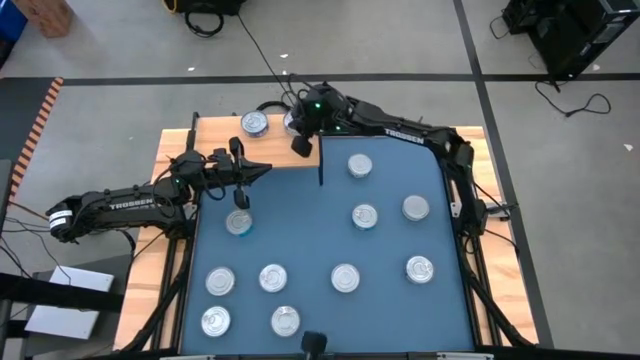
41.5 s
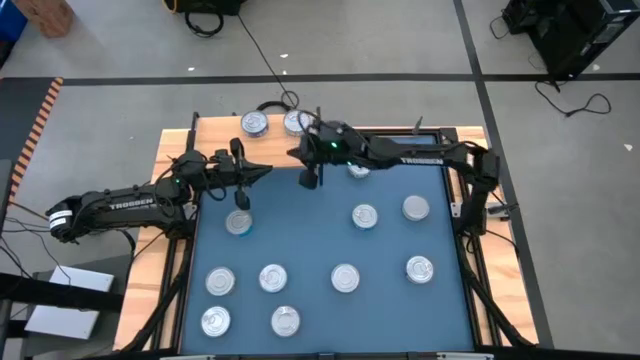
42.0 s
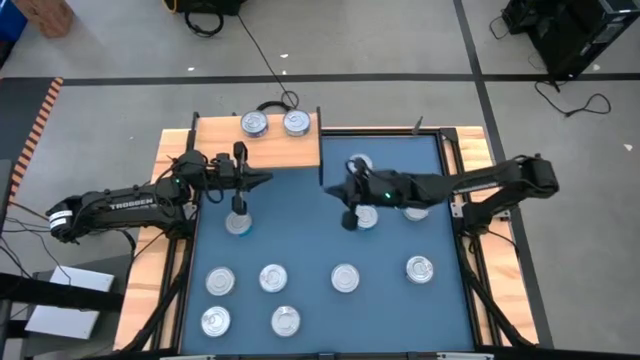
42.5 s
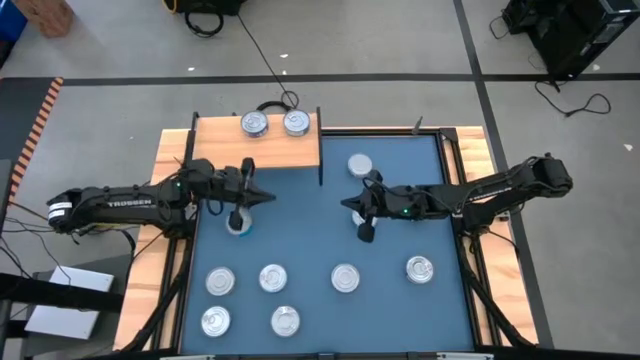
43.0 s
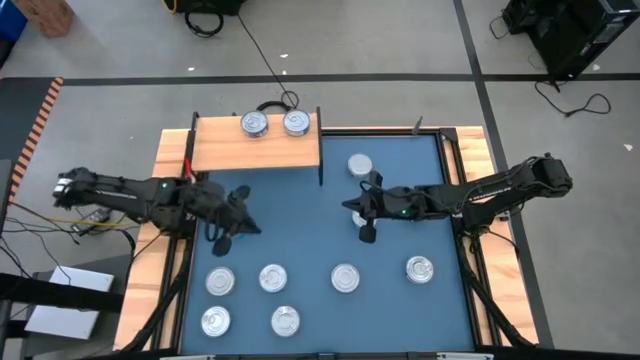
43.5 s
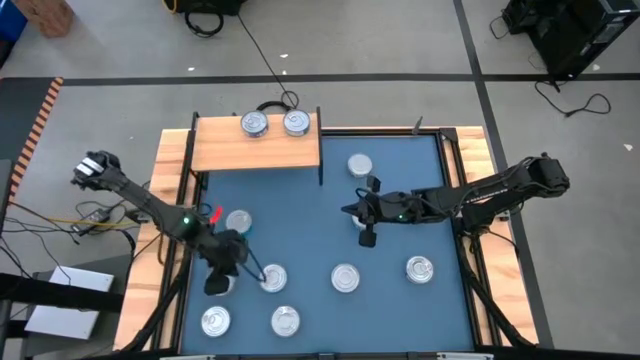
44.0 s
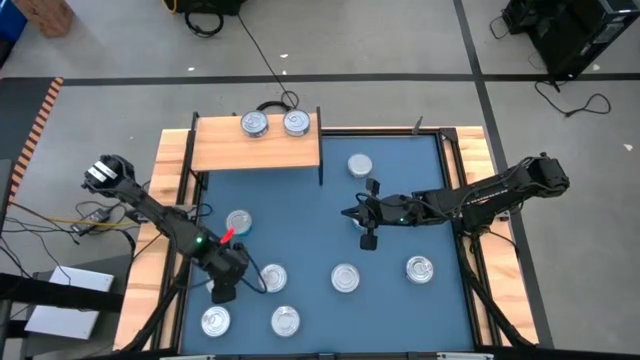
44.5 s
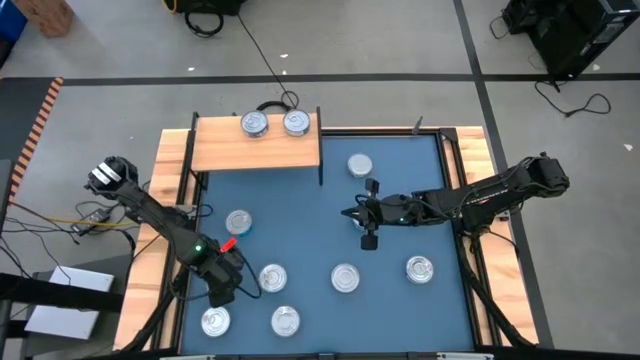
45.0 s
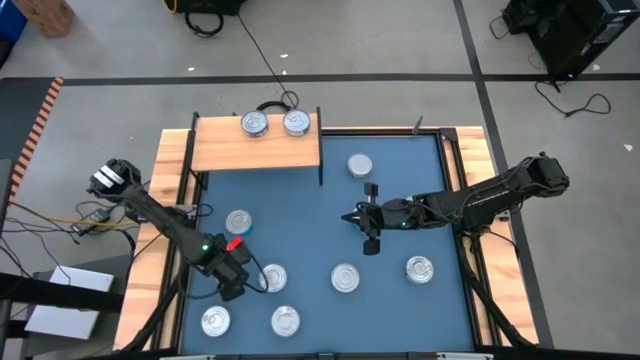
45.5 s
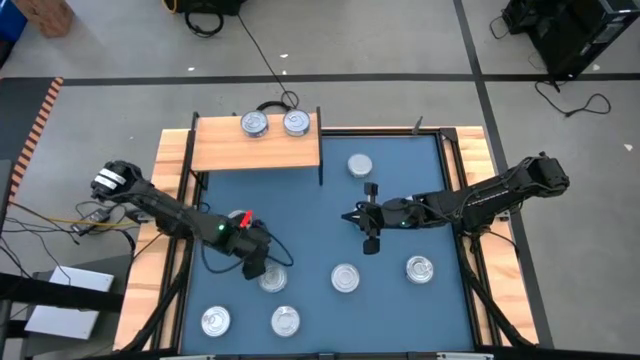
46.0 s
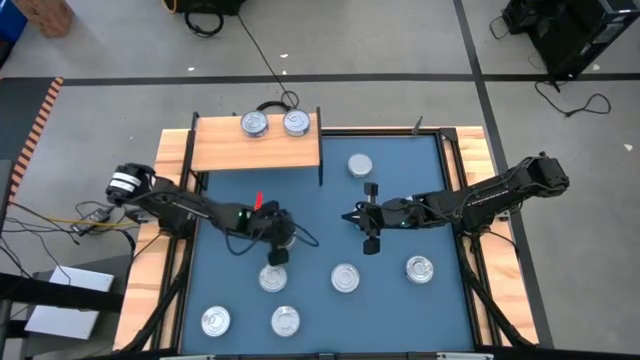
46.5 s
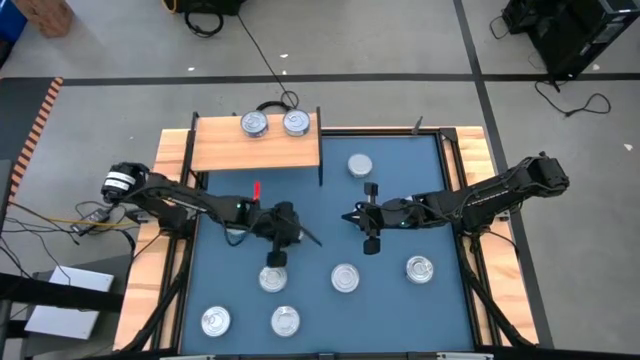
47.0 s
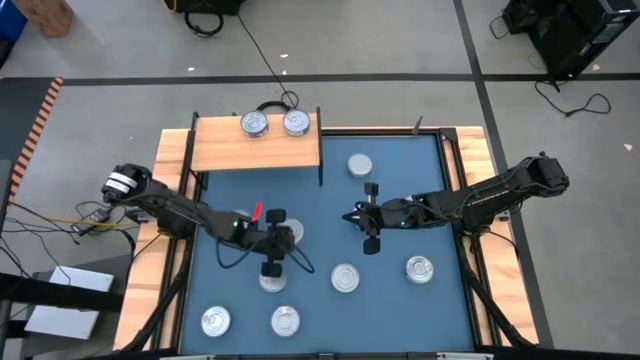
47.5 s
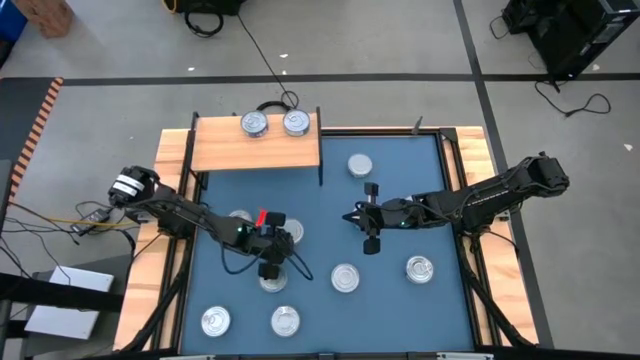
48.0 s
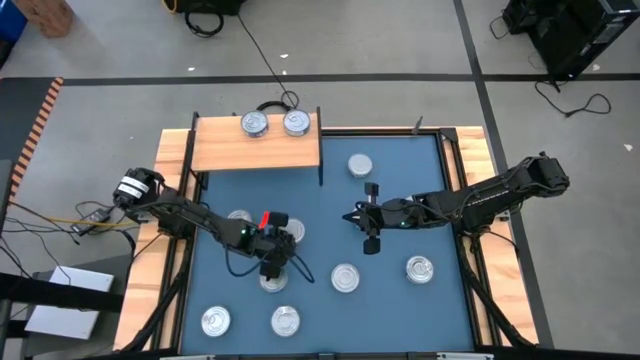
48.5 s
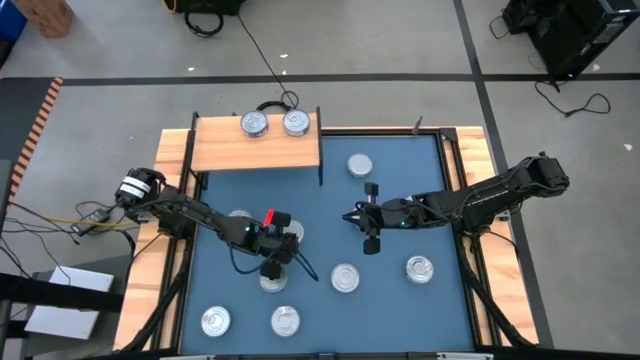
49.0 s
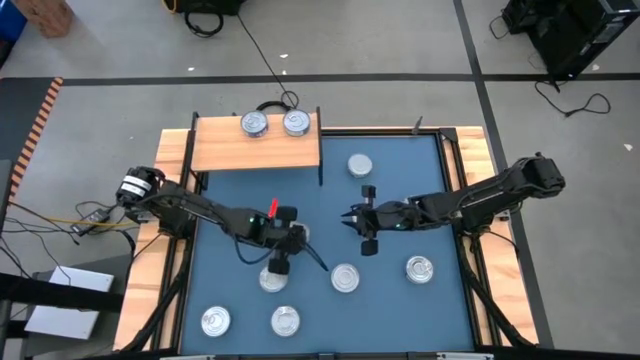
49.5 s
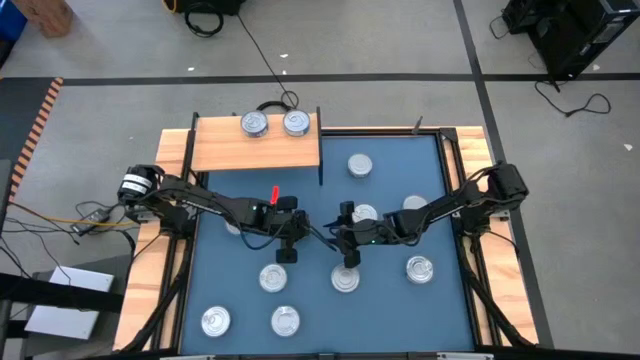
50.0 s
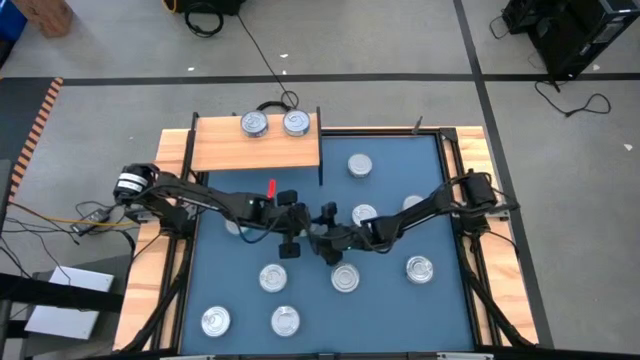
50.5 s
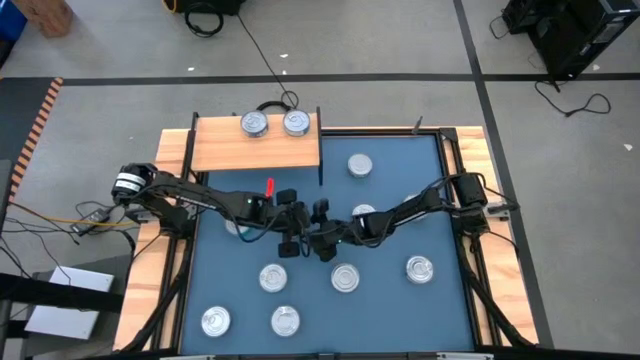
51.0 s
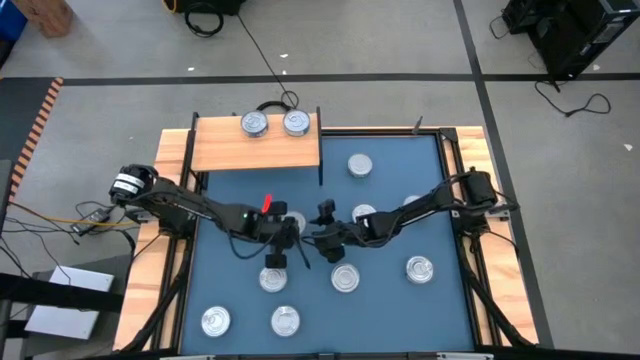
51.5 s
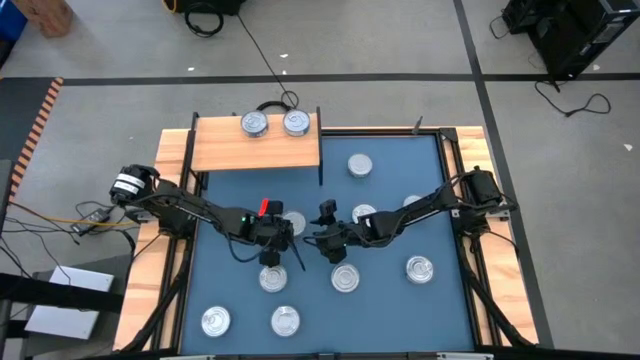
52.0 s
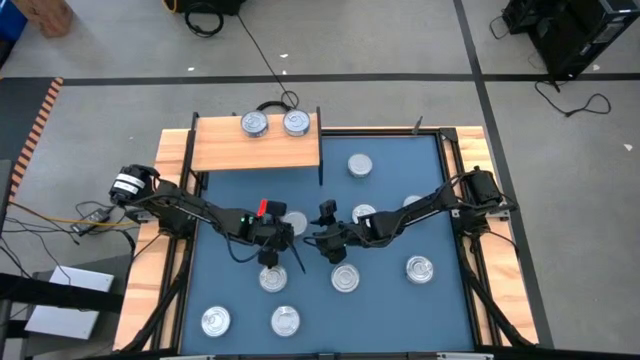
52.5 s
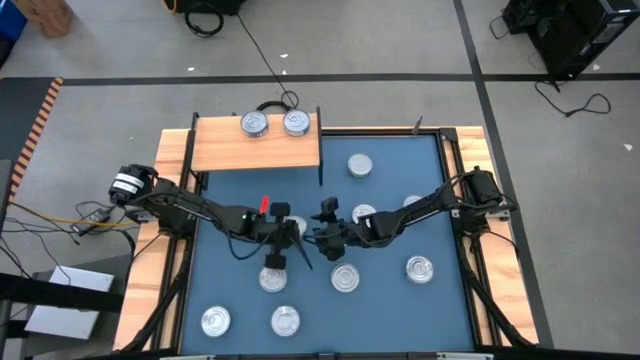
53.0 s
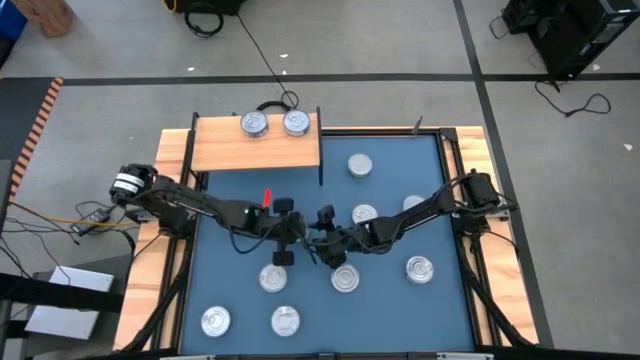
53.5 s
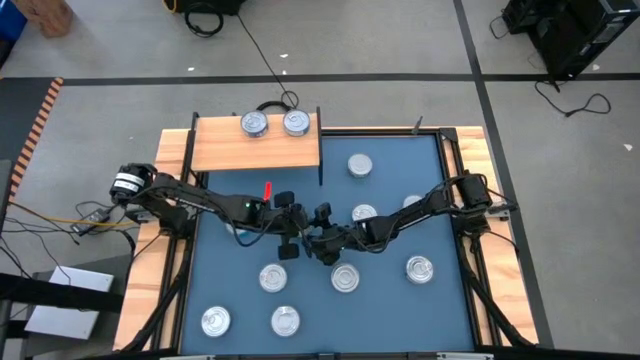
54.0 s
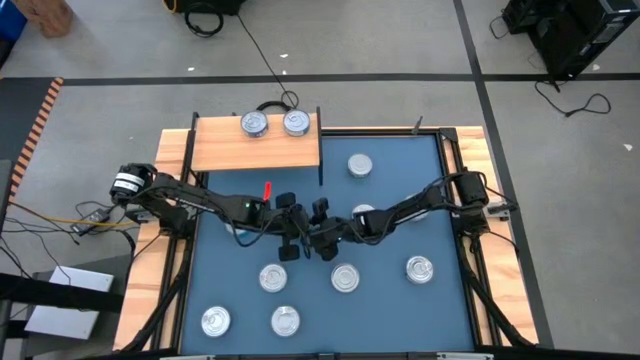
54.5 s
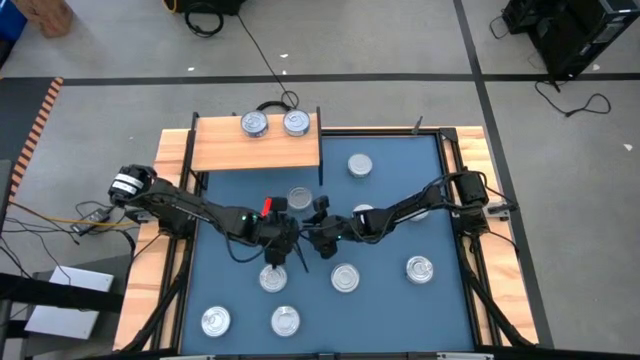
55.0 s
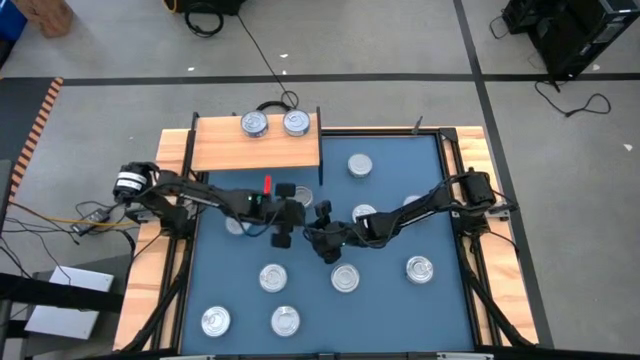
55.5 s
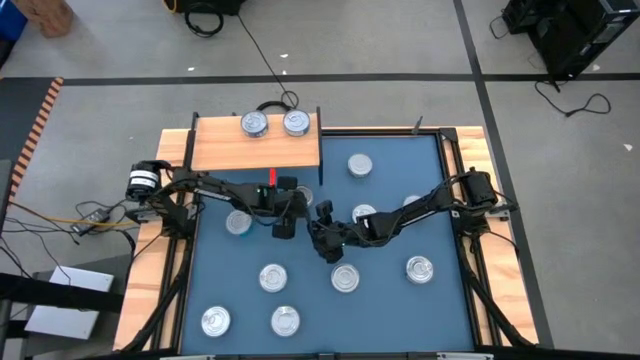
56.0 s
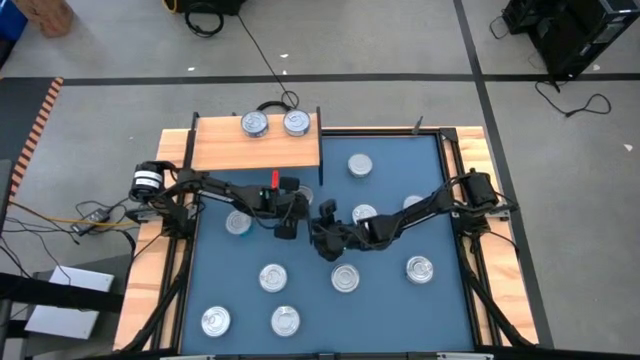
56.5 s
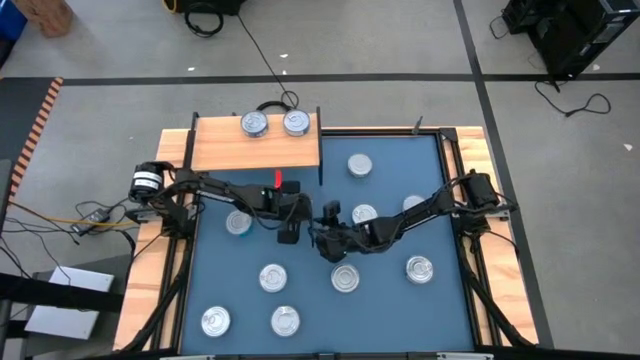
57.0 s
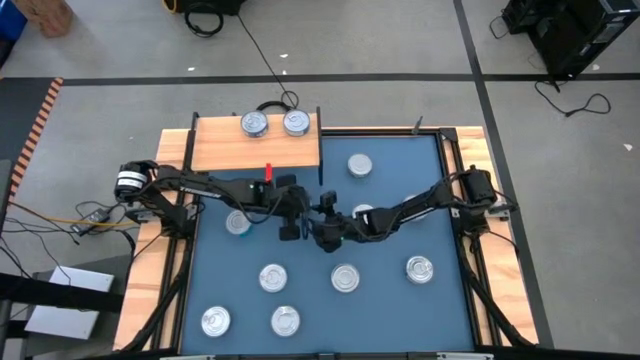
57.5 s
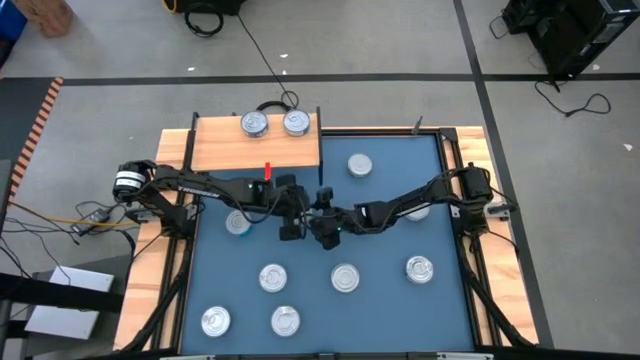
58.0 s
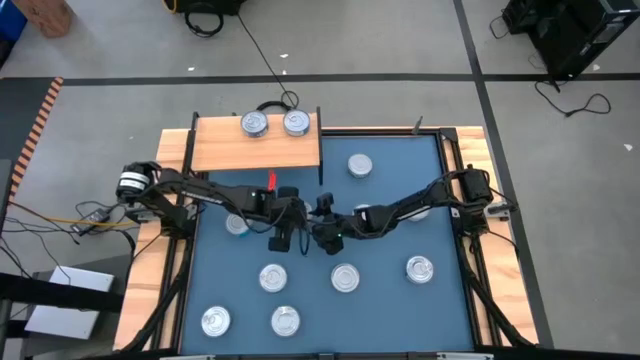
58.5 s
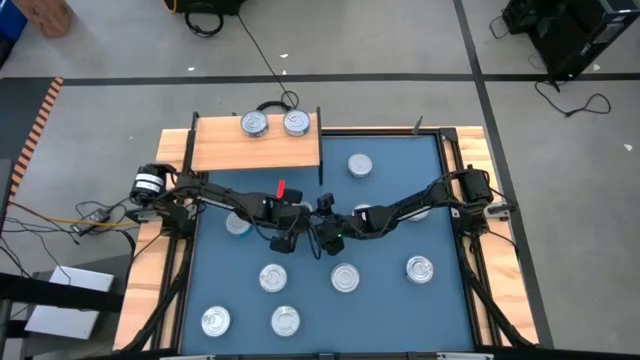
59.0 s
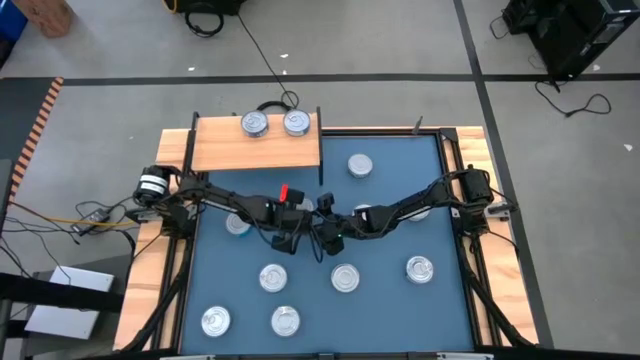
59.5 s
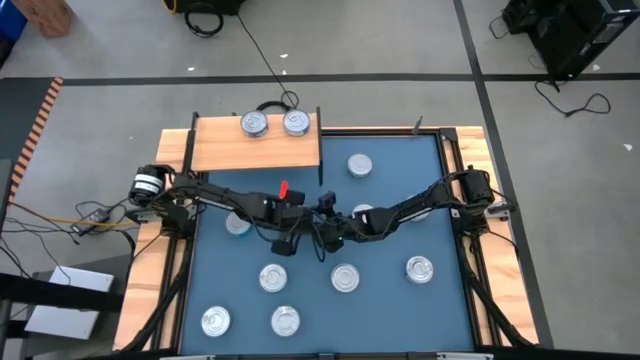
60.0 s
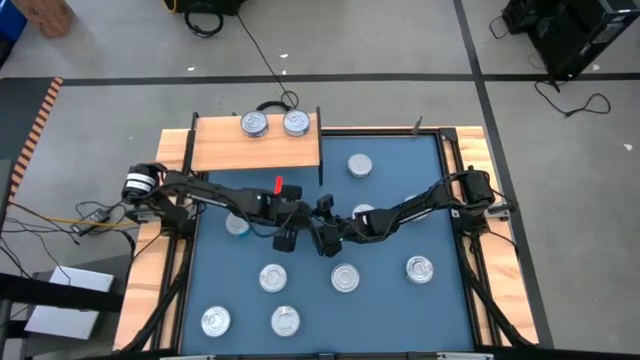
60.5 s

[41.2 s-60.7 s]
Task: Stack canned seafood by type on shelf
Put the green white tuna can on the shelf
